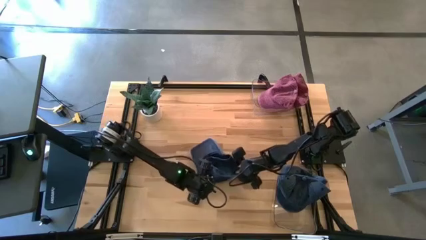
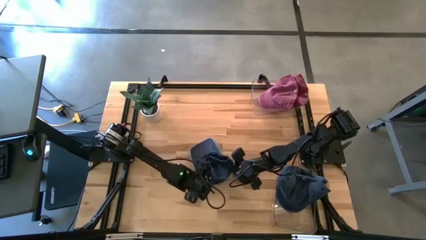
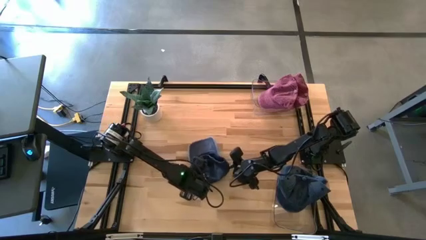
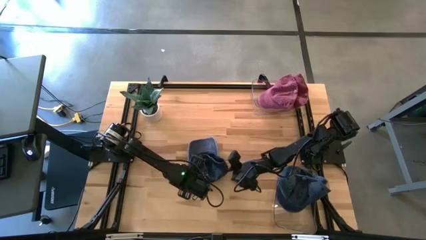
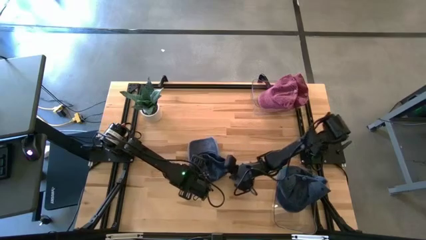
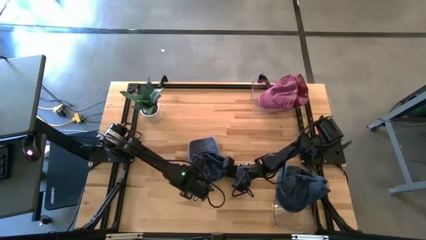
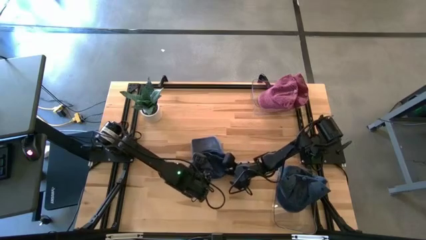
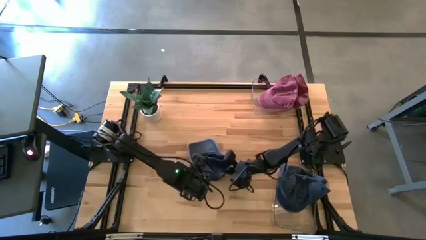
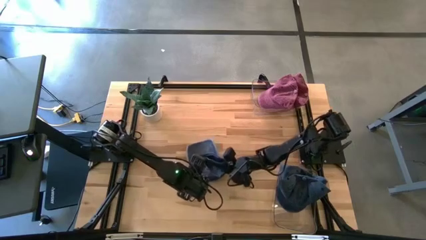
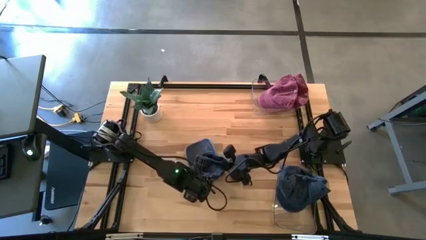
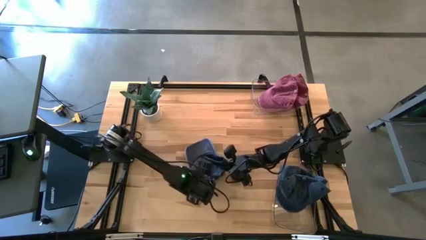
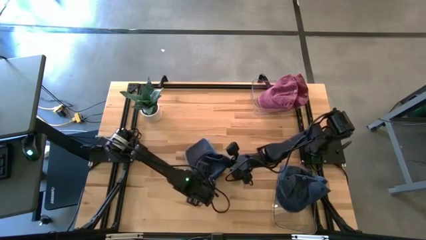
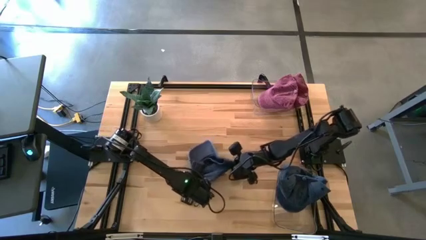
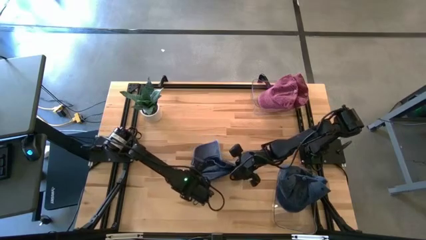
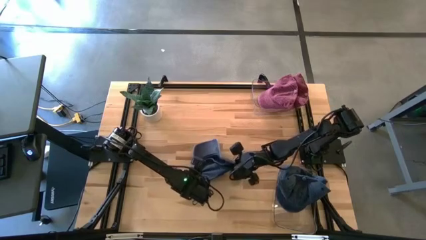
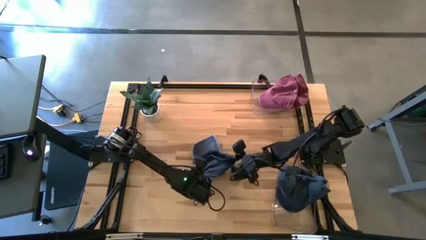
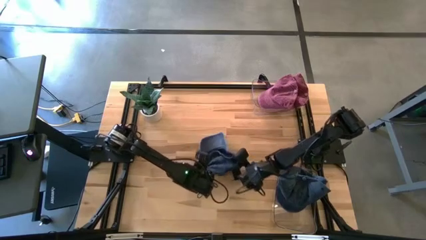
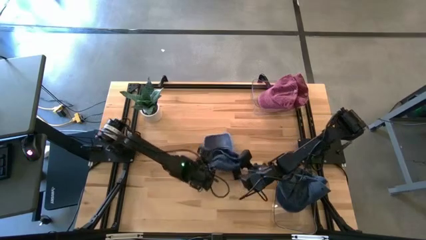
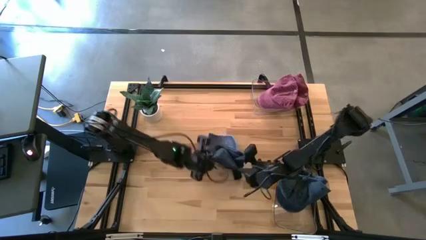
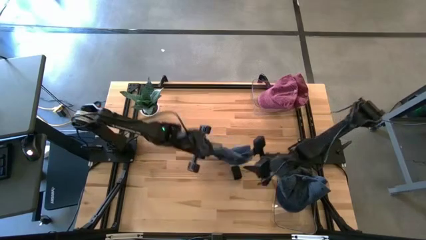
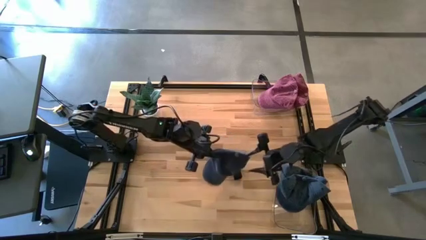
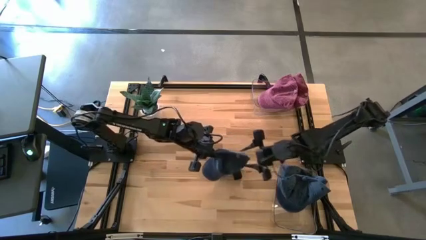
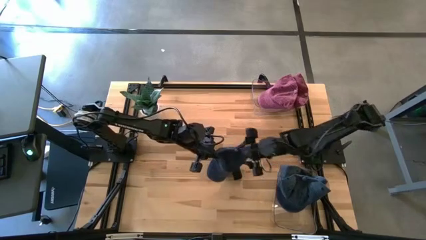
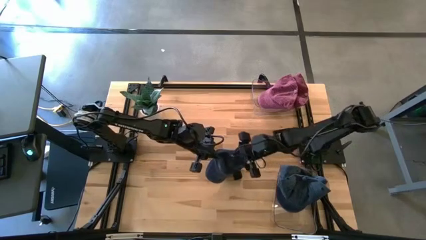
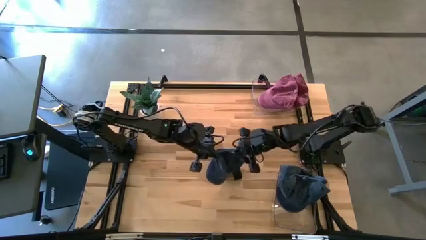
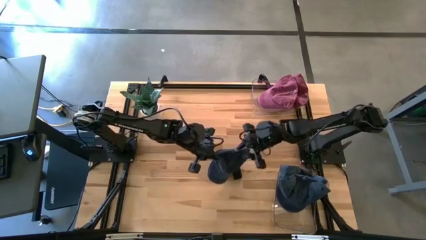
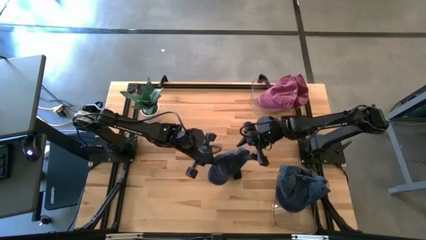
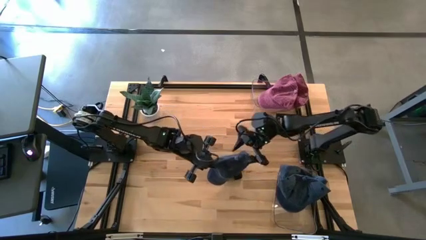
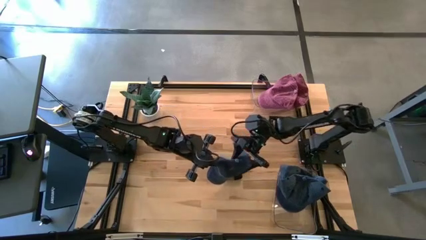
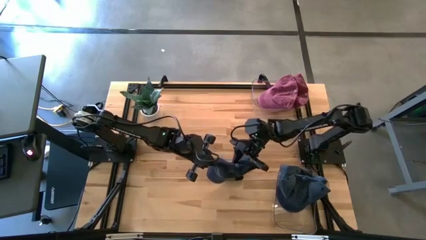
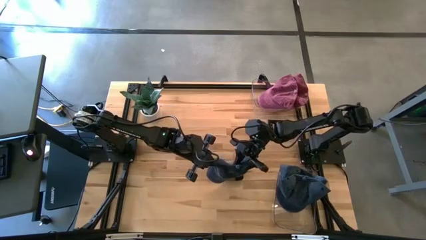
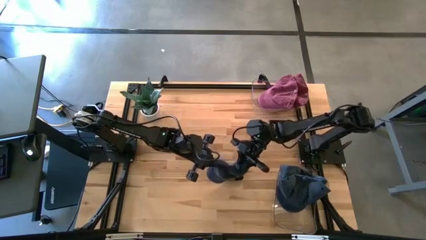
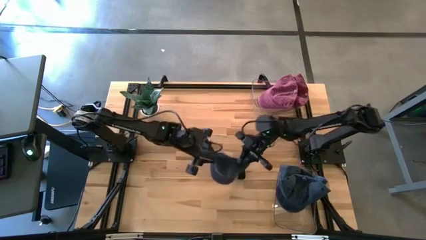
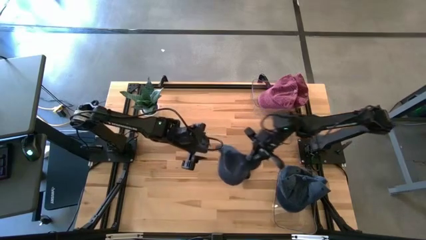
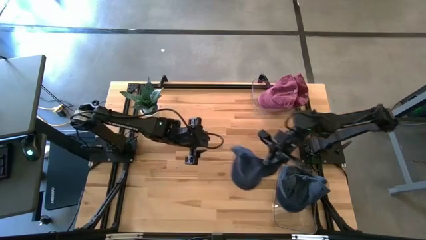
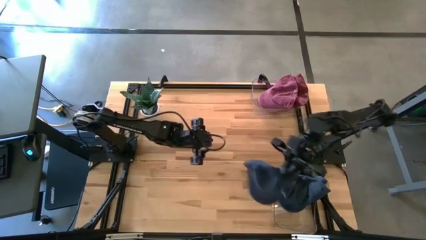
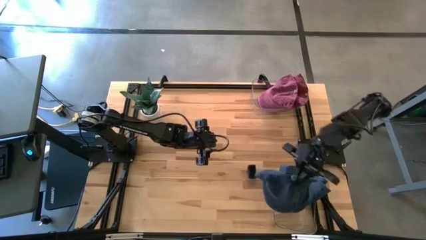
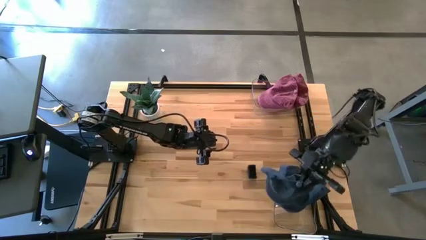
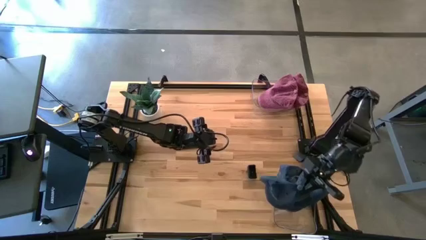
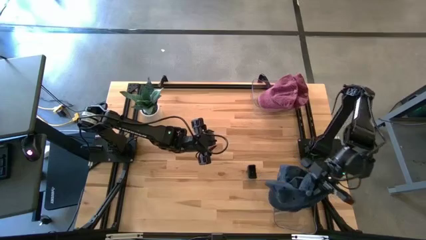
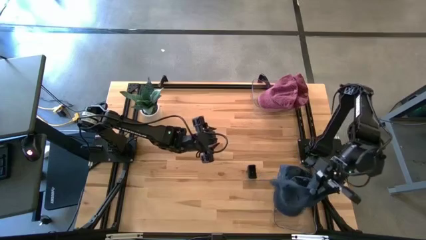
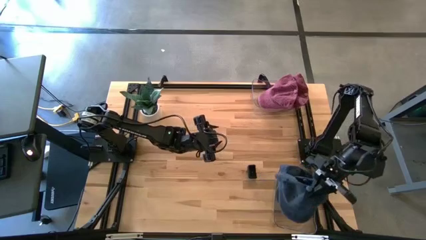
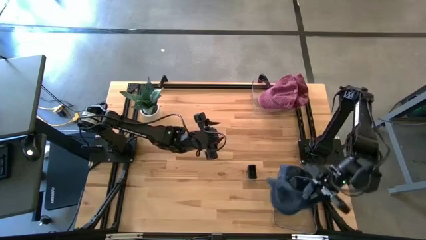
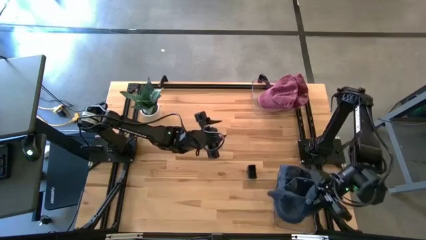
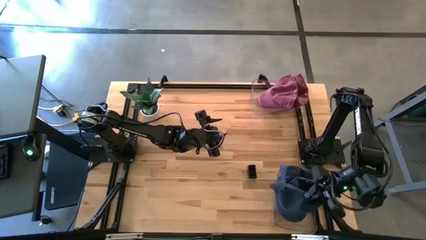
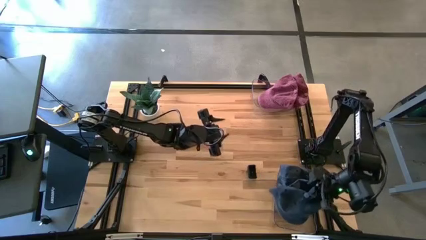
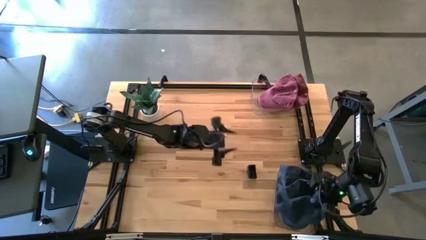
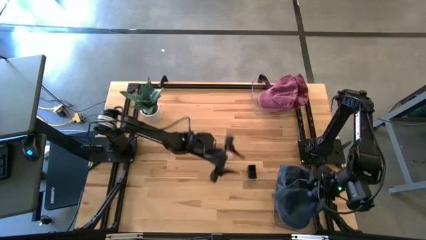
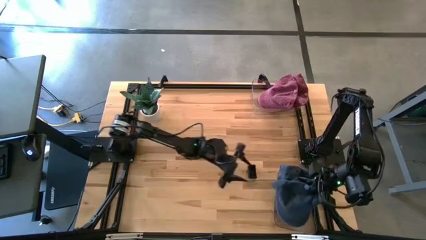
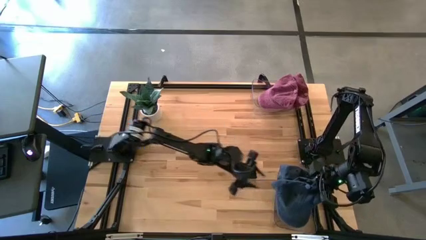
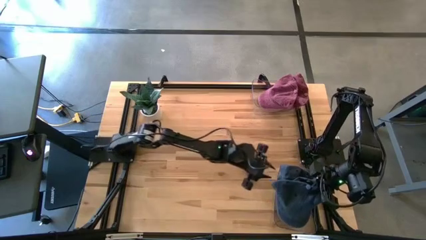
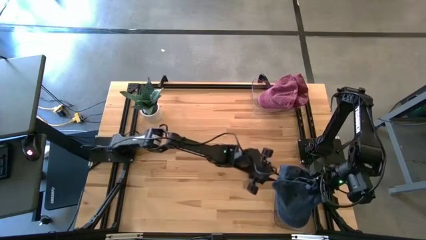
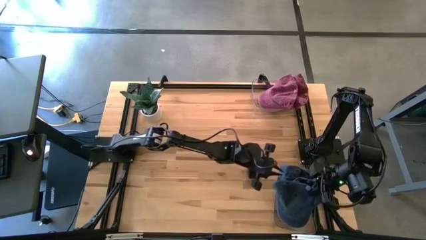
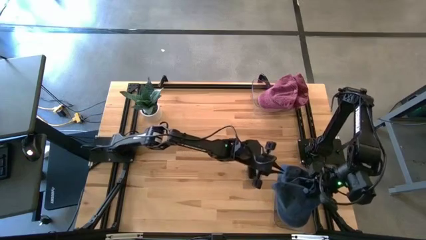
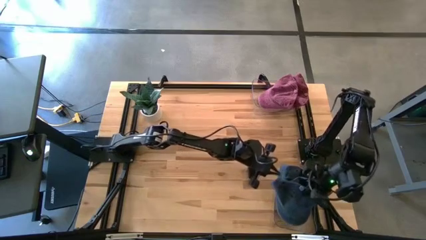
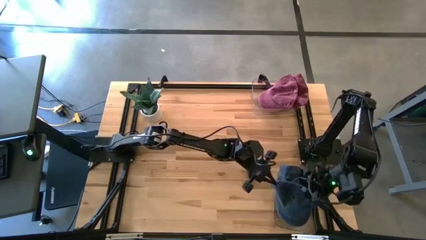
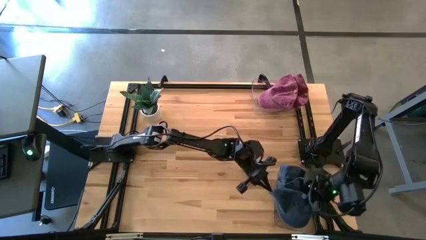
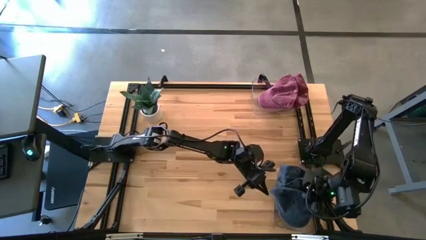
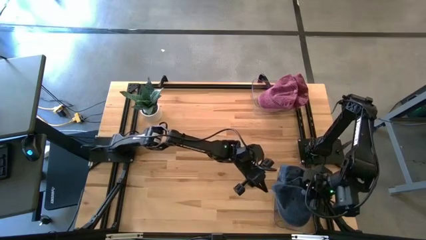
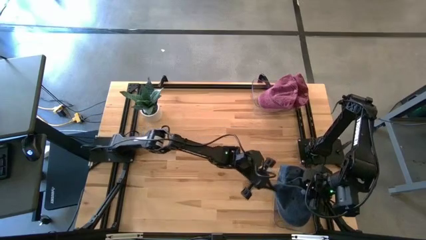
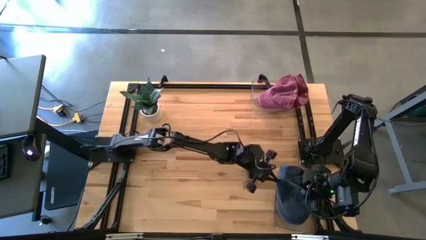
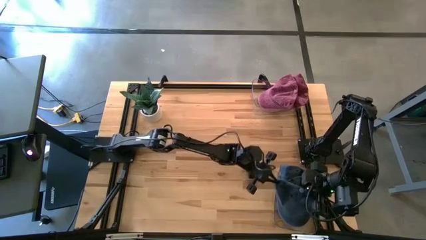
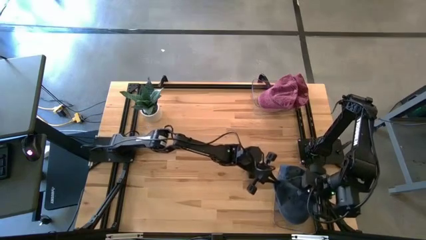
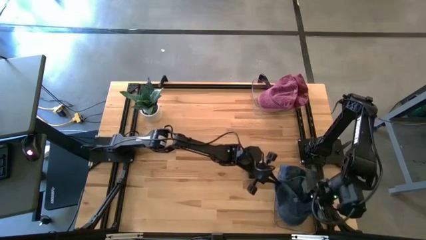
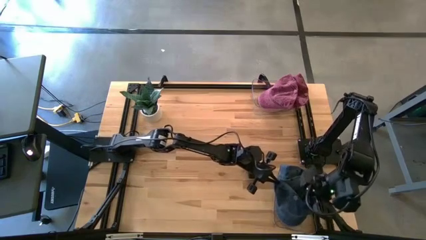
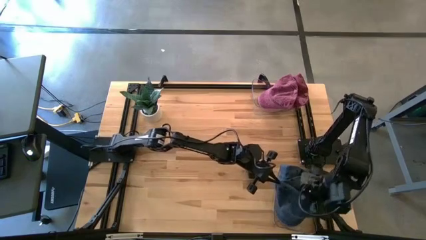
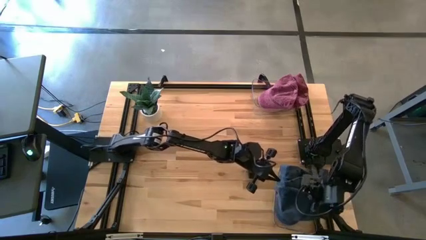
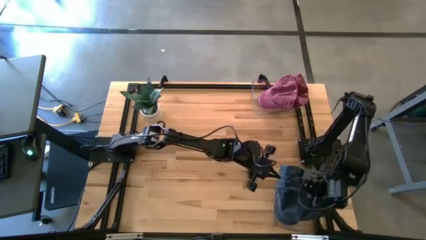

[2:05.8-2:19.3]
Task: Pick & Place hat
Put the blue cap into the bottom transparent bin
